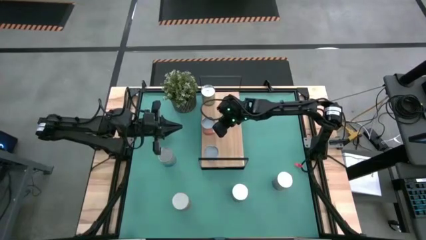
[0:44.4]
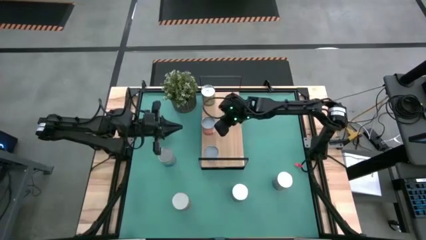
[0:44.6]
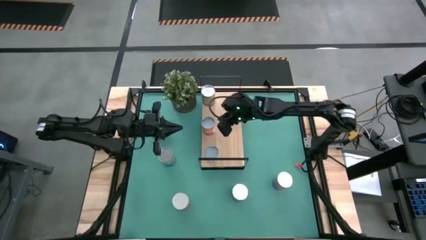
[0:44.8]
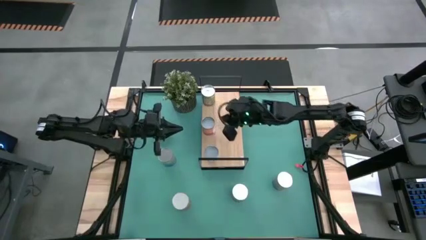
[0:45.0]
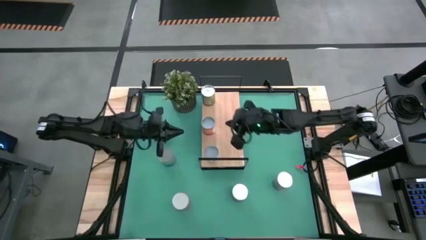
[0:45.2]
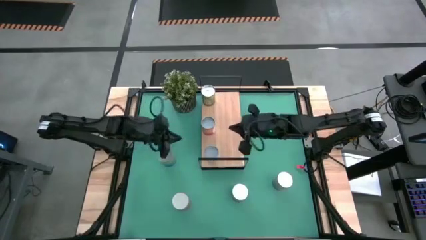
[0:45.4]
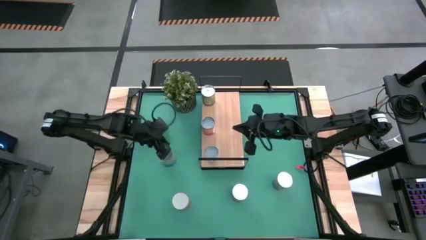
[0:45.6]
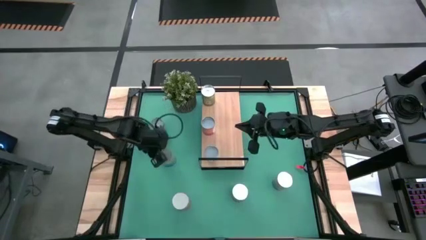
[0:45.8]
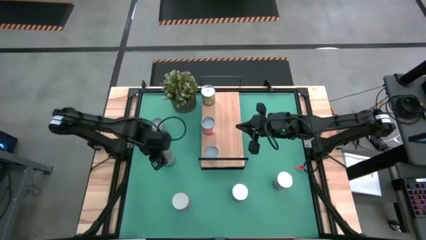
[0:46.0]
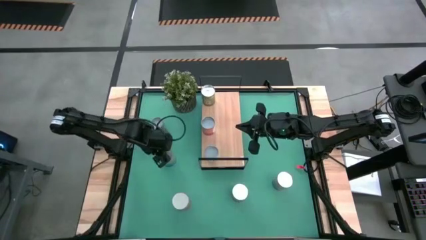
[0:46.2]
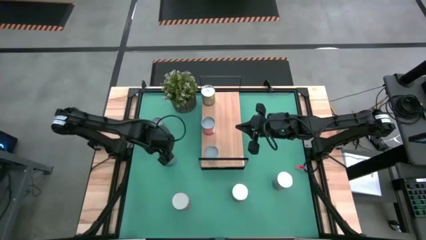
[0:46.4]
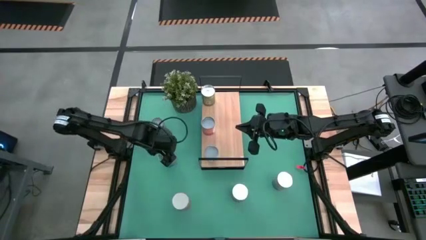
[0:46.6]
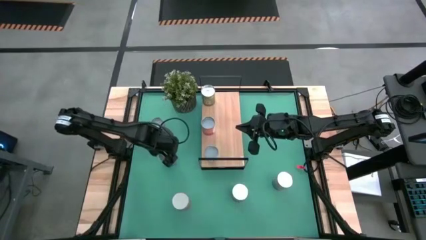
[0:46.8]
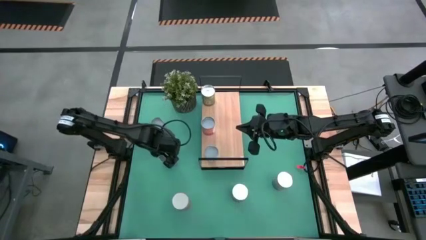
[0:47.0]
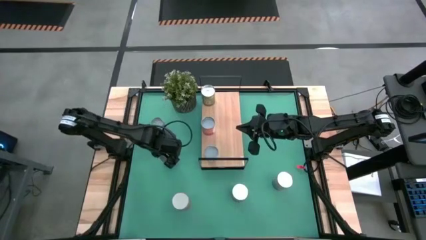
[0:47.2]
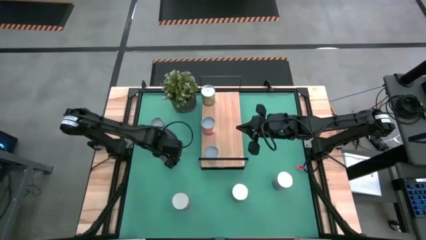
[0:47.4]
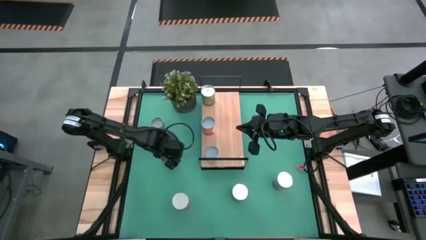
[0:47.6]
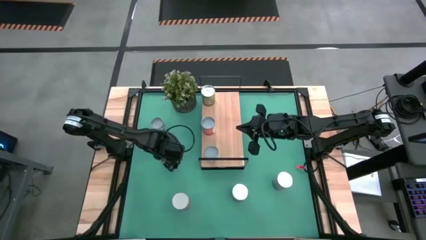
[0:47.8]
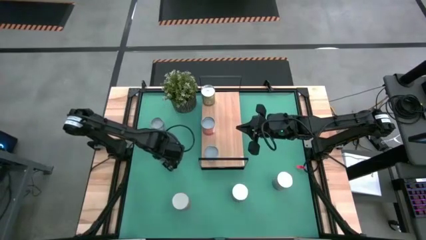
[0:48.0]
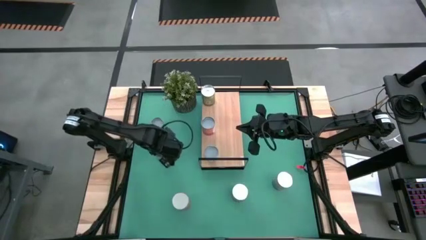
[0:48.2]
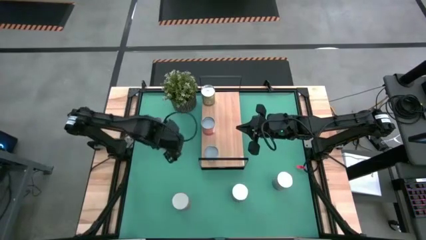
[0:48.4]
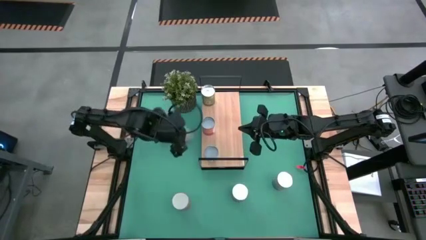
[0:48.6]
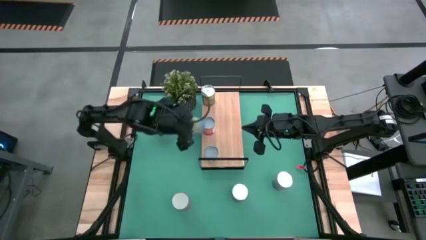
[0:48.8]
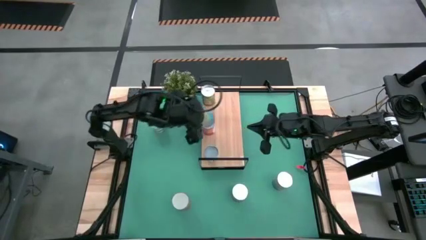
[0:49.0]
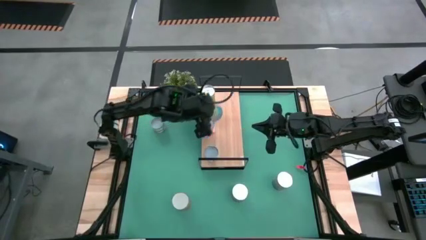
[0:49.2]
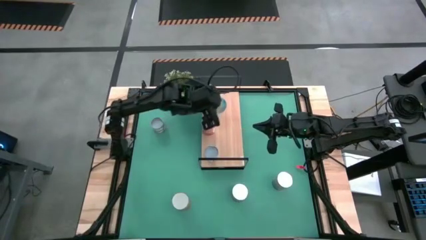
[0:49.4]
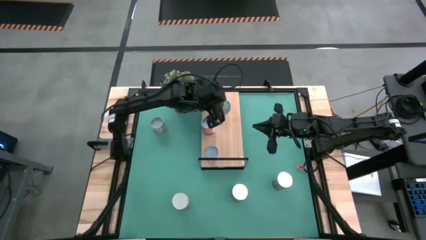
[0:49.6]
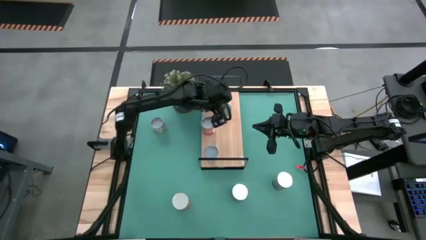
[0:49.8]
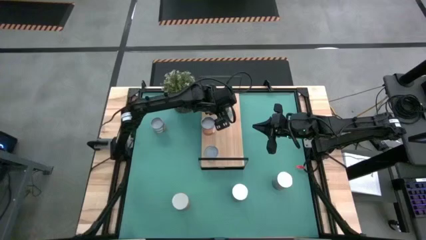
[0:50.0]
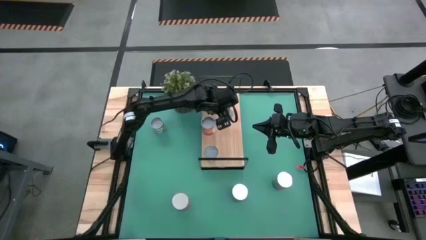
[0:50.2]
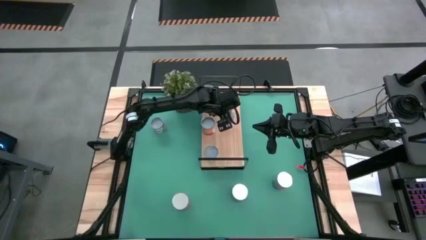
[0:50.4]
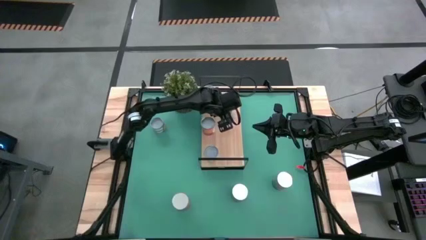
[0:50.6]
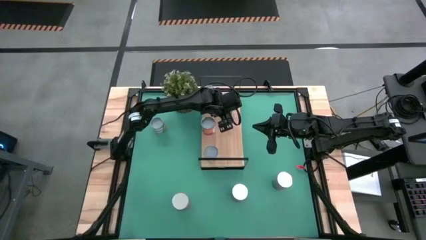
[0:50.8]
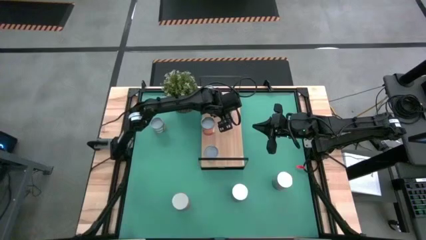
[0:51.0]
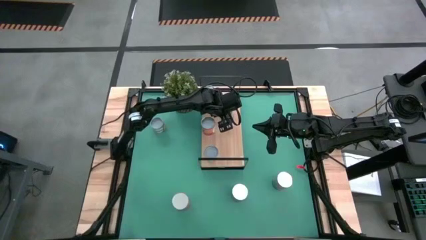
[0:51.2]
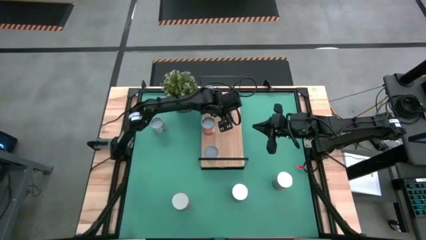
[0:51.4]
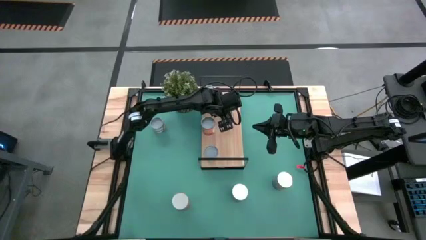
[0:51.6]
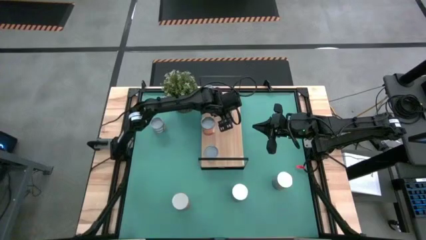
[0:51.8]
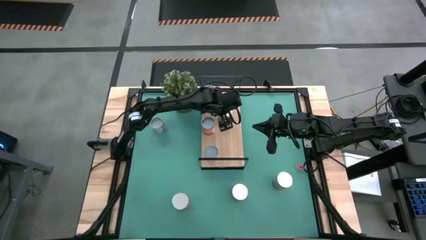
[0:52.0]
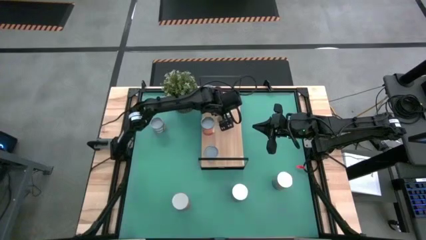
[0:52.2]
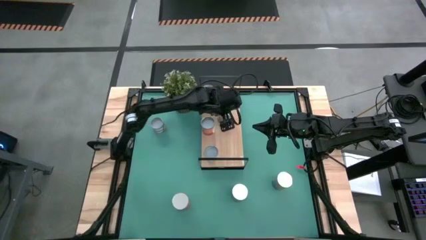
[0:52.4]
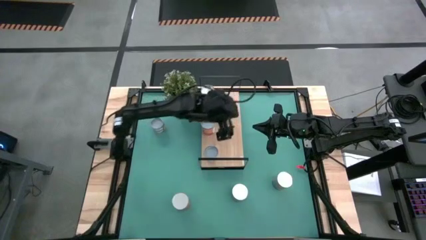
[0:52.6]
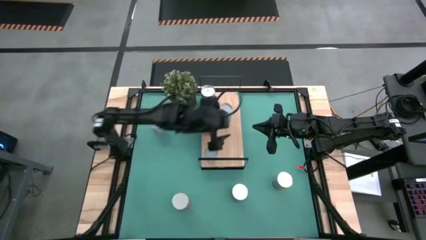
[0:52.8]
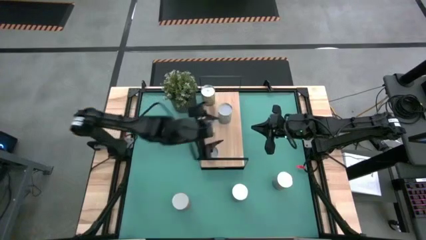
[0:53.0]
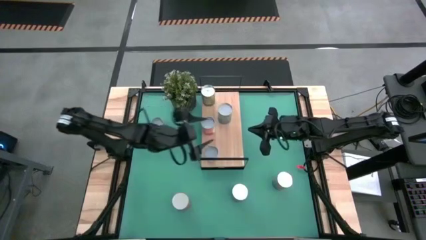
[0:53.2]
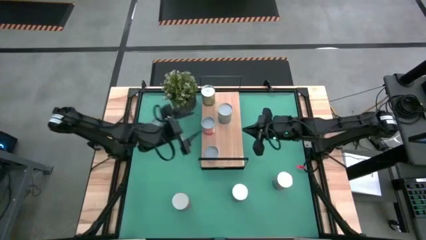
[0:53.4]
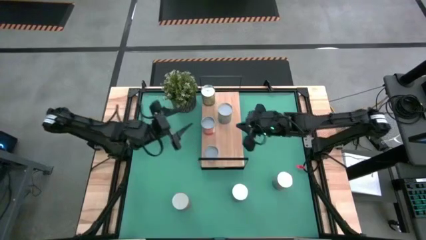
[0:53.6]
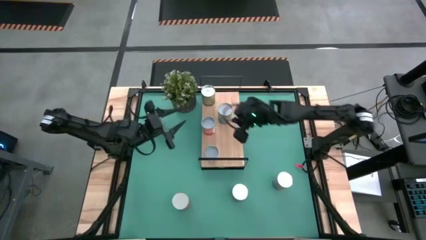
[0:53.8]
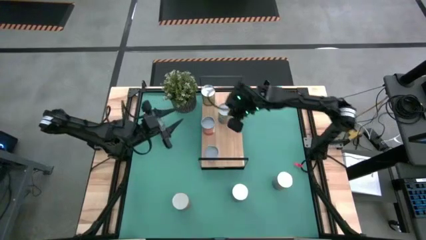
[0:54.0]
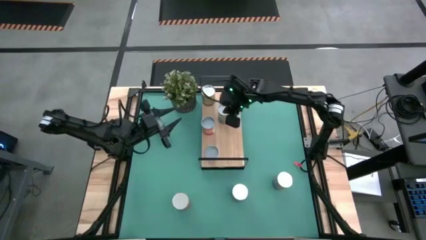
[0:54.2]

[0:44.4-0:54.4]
Task: Pick and place cans onto a shelf
Put the canned cherries on the shelf

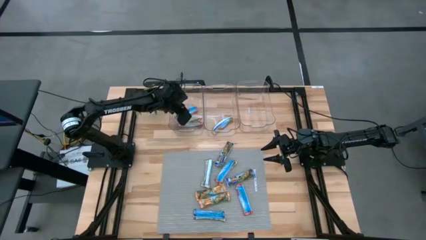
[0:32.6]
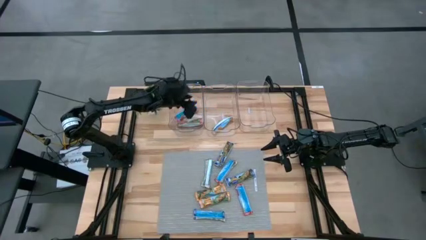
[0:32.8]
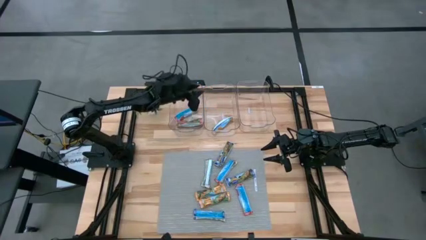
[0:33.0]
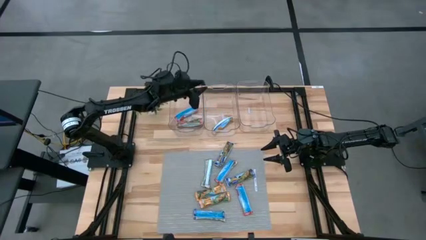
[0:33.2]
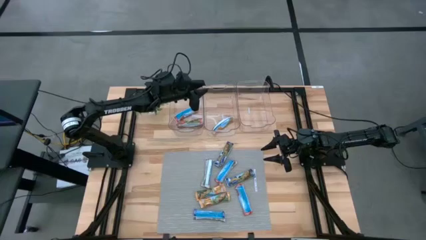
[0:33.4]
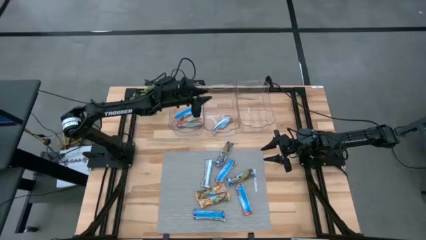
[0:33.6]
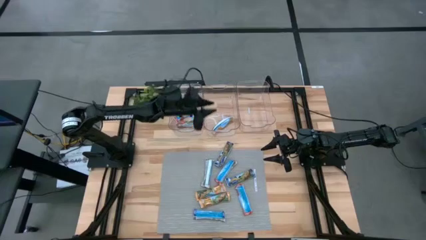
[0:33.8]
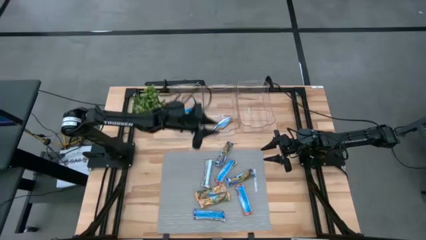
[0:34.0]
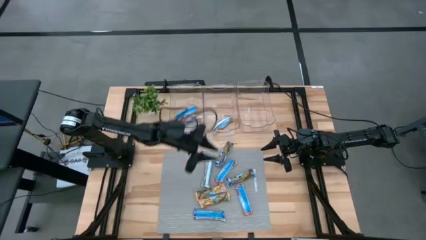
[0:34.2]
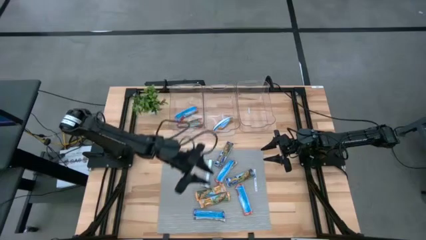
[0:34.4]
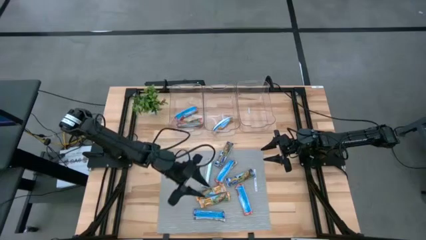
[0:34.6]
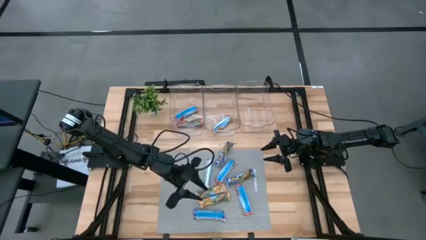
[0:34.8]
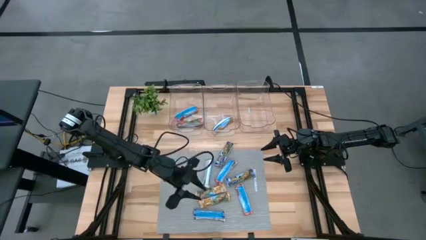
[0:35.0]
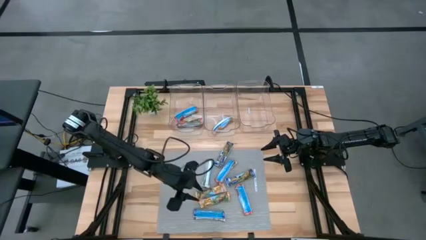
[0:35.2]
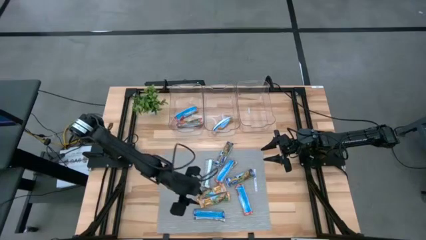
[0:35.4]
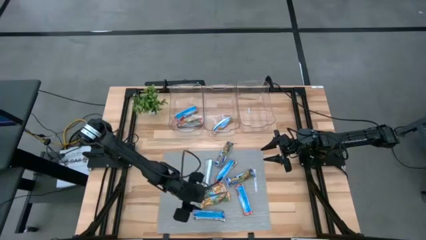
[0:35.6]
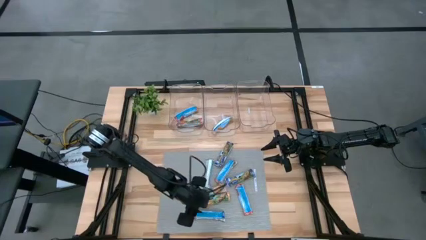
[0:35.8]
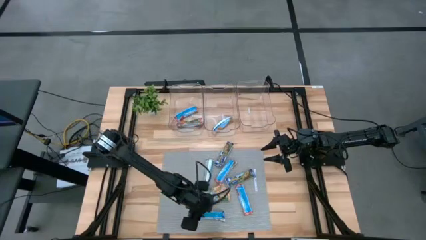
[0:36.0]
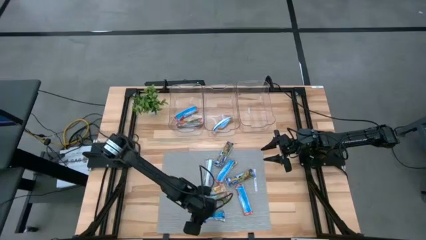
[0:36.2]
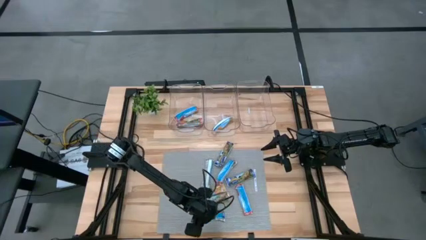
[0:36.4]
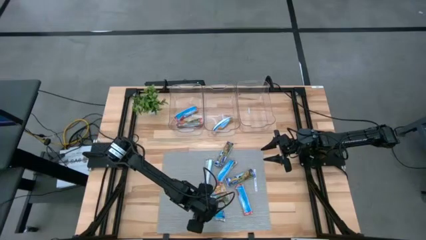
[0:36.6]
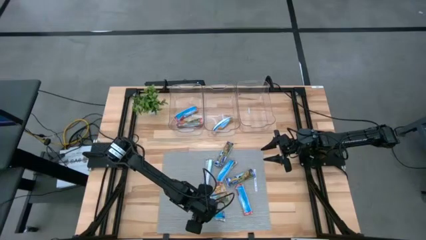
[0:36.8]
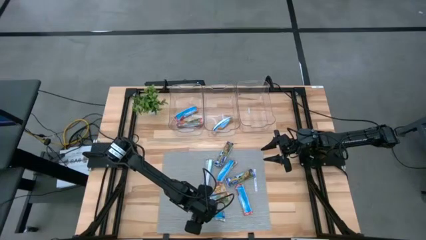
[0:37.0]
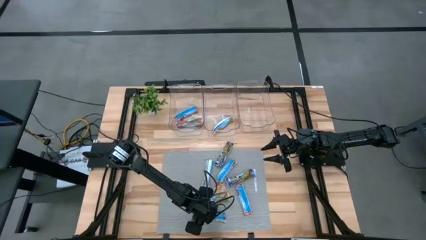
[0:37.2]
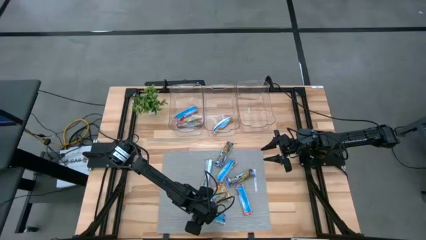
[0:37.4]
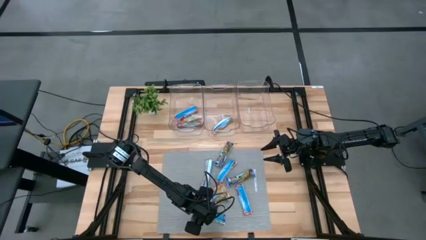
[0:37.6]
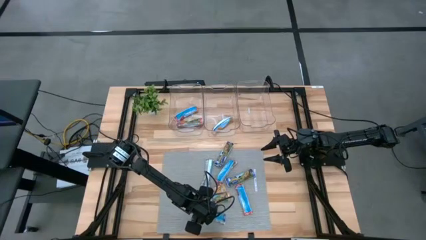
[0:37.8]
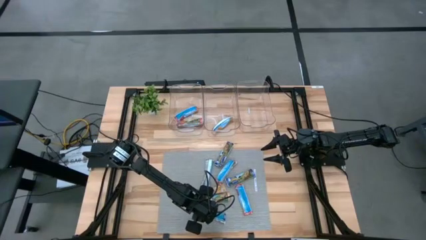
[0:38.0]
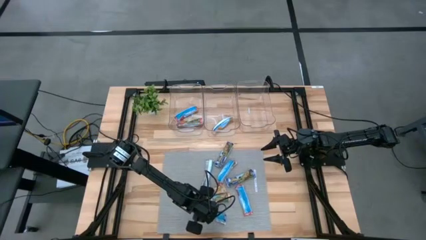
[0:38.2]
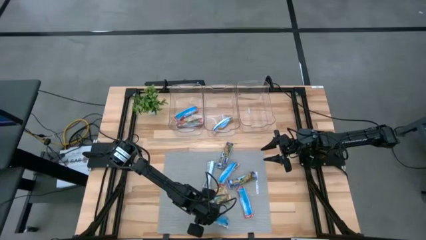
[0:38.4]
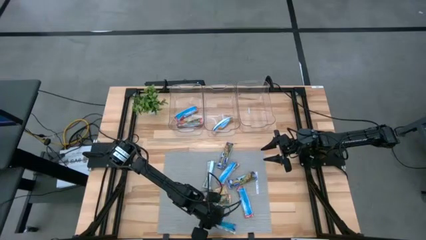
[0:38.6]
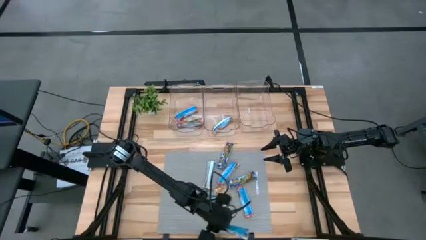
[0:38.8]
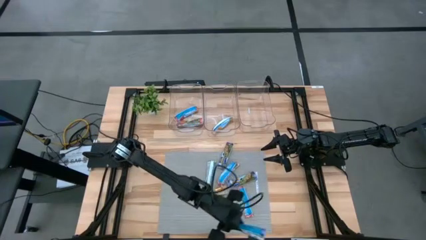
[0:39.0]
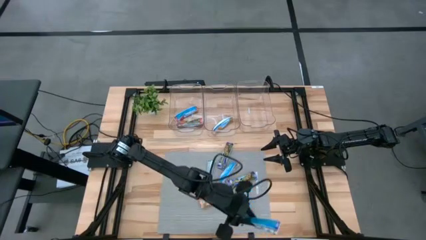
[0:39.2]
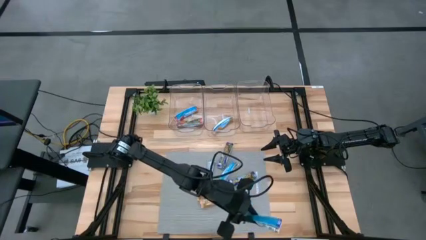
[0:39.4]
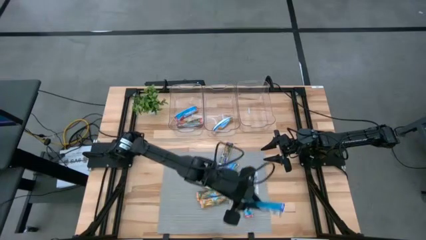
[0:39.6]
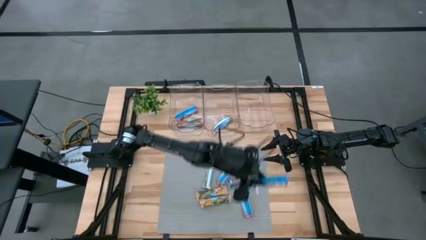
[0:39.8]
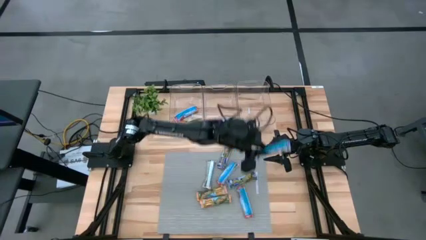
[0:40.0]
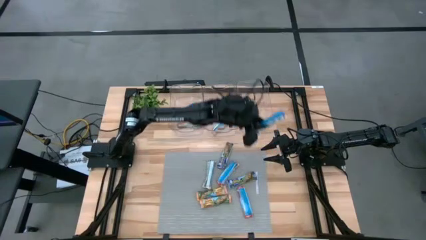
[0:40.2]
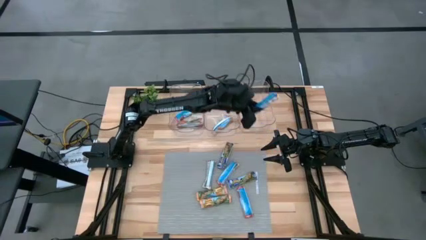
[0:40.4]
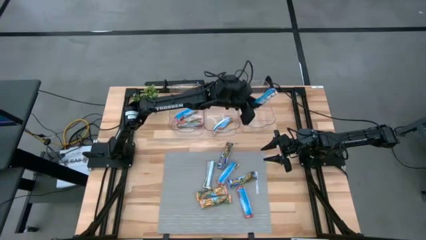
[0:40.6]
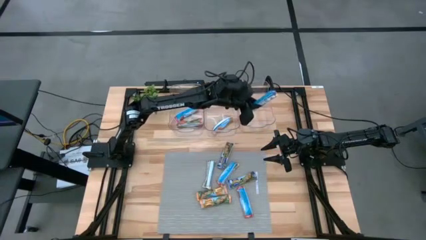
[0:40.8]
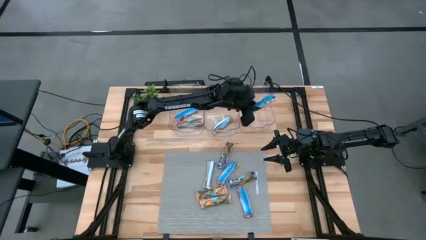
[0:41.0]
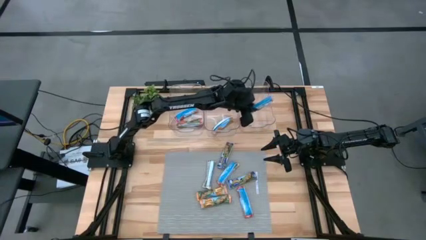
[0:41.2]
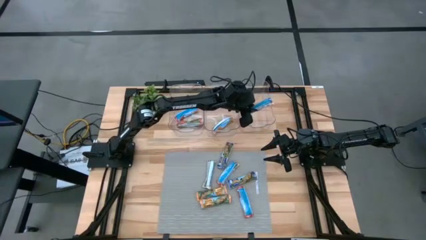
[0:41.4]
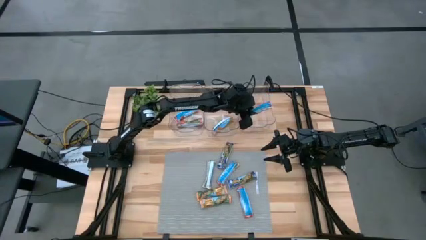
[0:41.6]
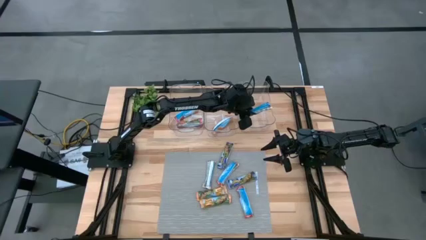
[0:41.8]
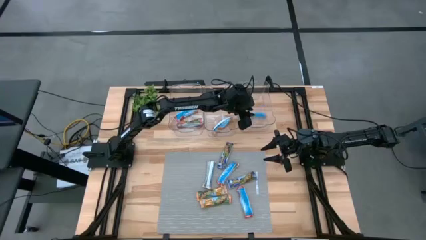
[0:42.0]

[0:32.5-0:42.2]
Task: Pick and place Granola Bars by type
Put the blue granola bar into the right transparent bin
